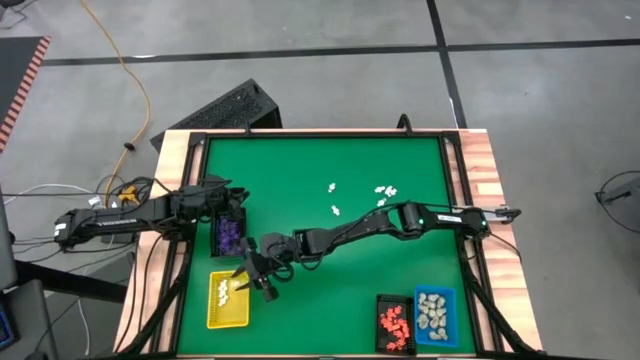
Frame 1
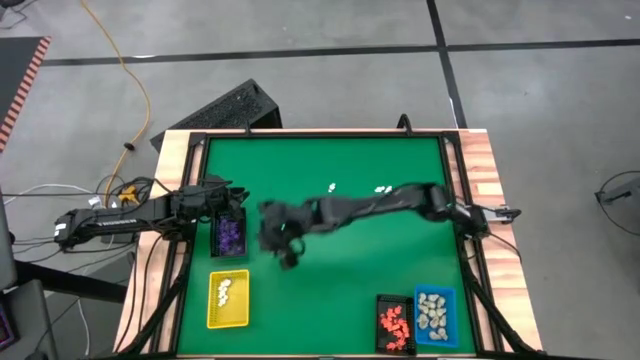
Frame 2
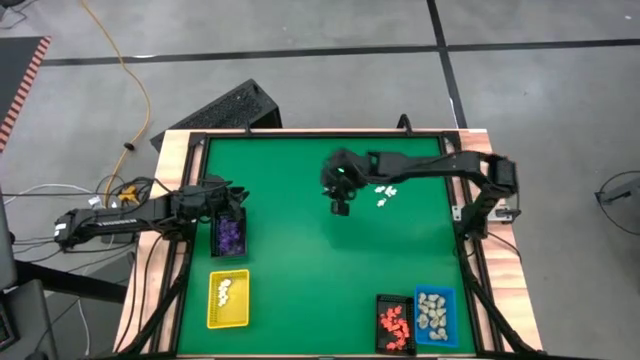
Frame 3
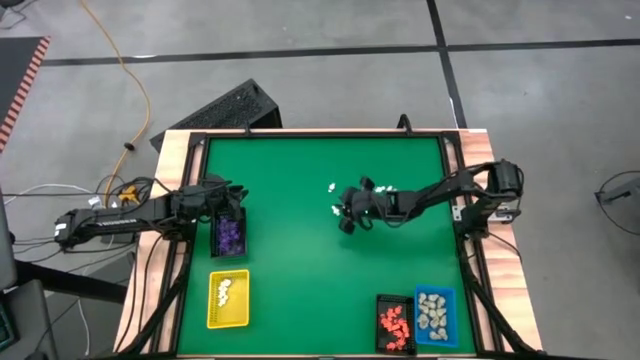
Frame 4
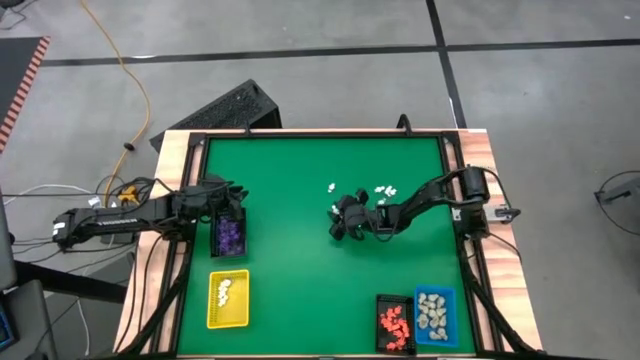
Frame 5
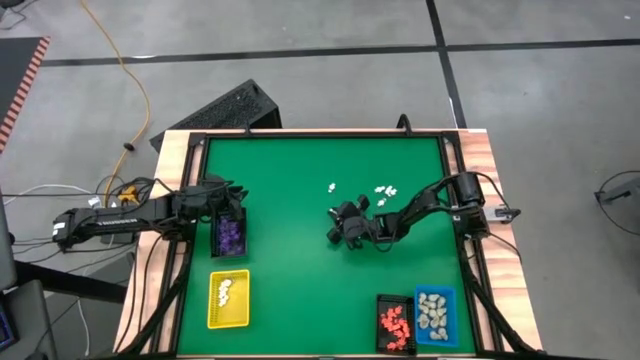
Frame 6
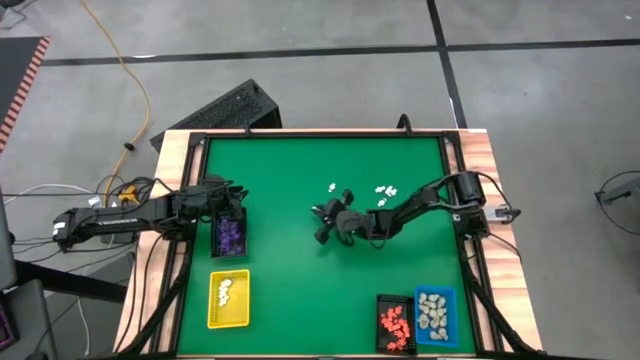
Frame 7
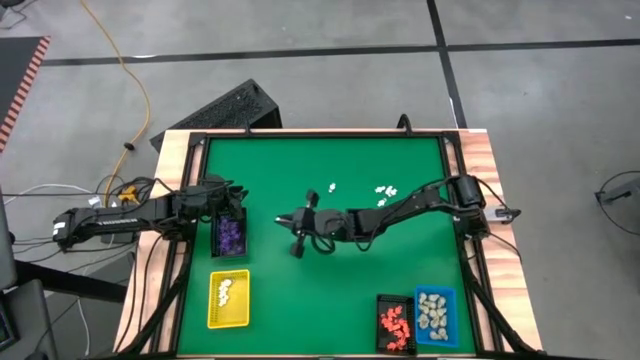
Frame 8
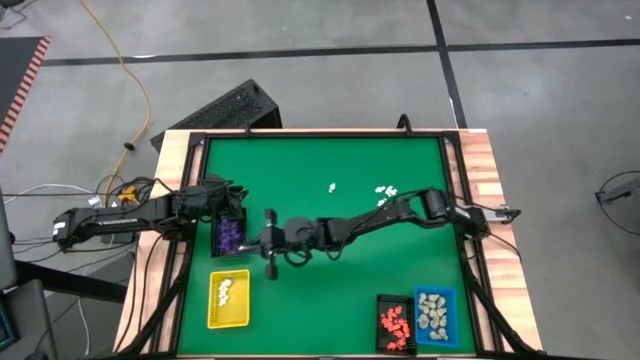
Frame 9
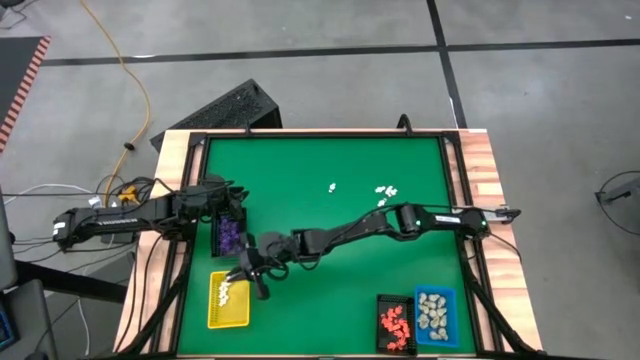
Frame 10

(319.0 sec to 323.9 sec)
Task: Sort Halloween decoration
Put the white skeleton toy into the yellow basket

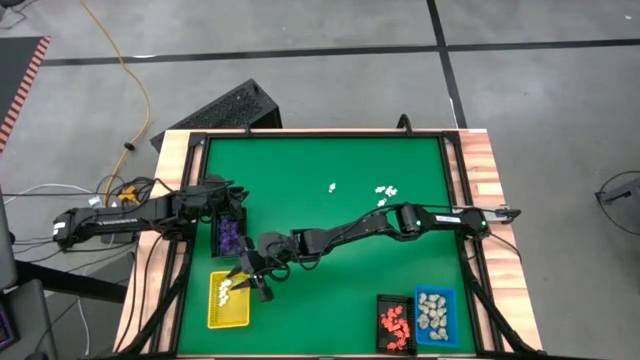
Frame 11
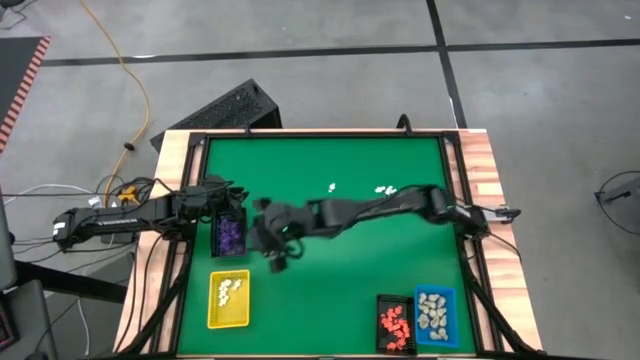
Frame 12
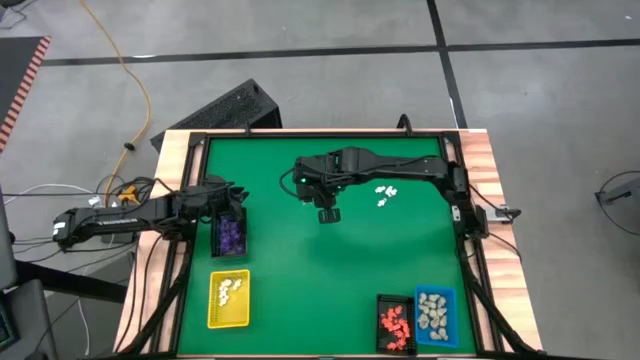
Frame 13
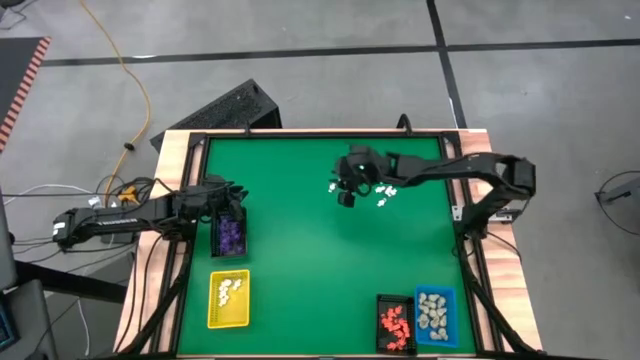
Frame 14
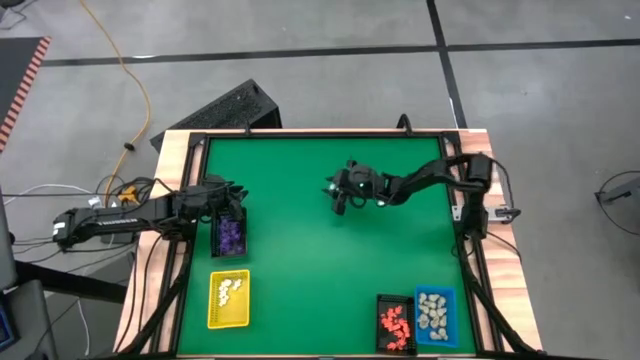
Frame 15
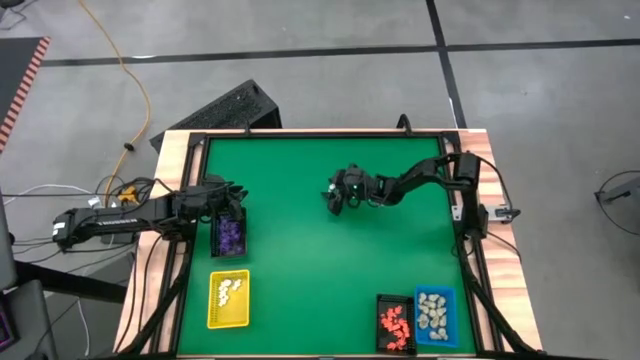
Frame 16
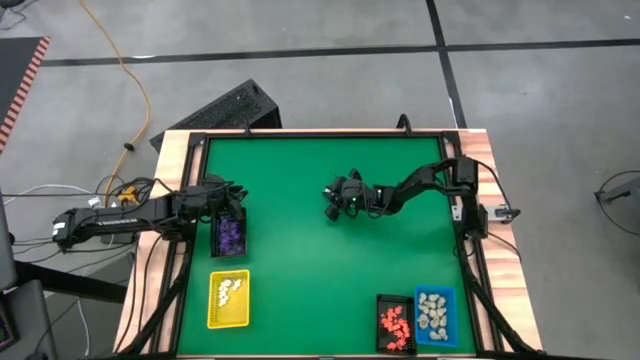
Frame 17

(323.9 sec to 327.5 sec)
Put the white skeleton toy into the yellow basket

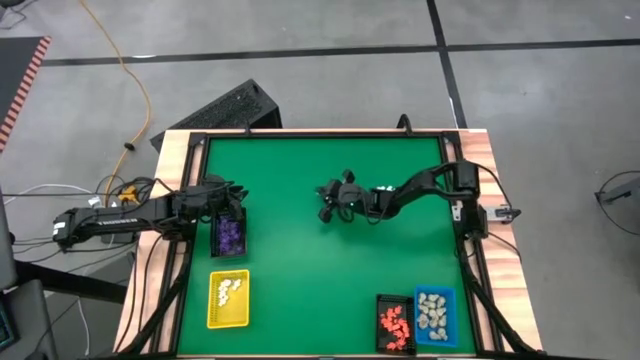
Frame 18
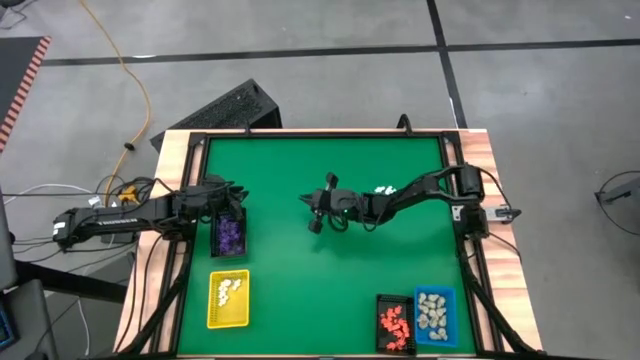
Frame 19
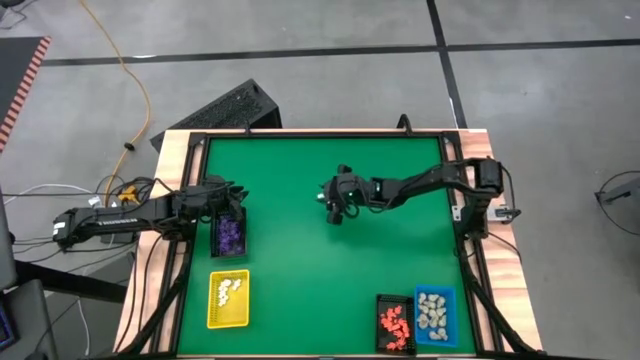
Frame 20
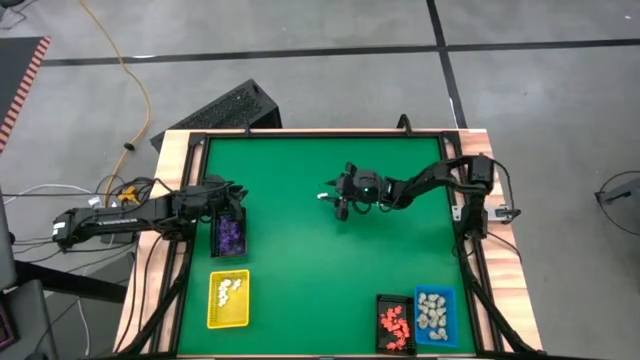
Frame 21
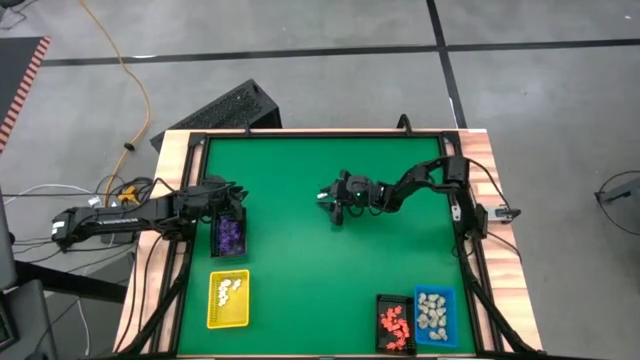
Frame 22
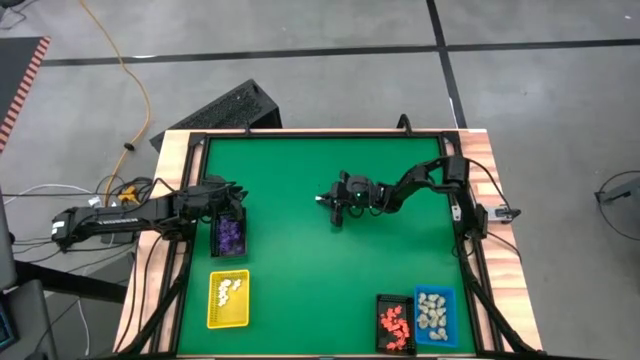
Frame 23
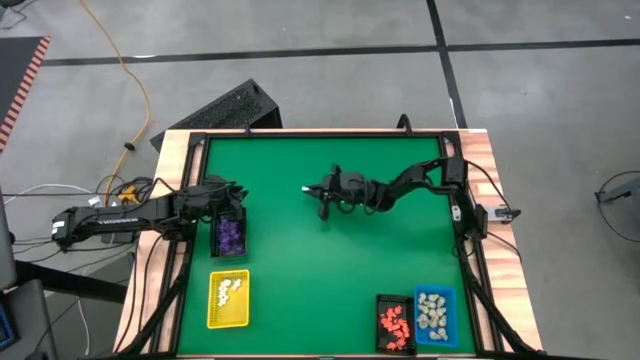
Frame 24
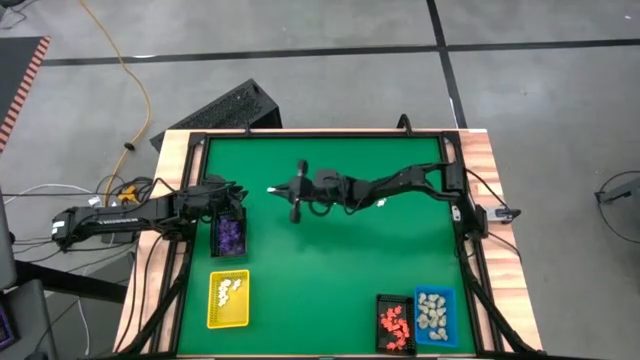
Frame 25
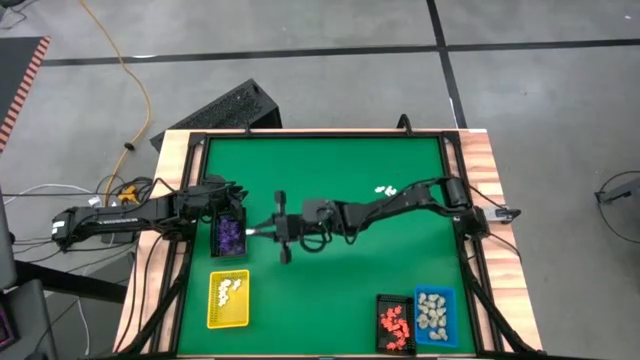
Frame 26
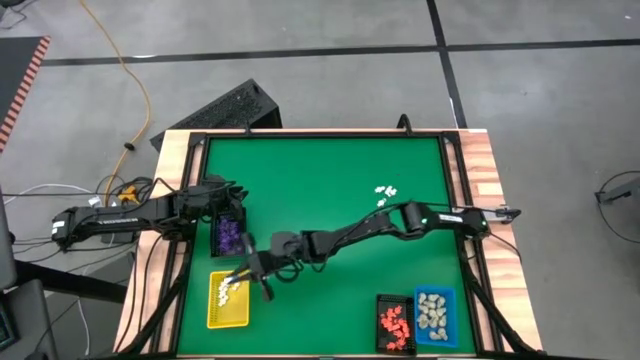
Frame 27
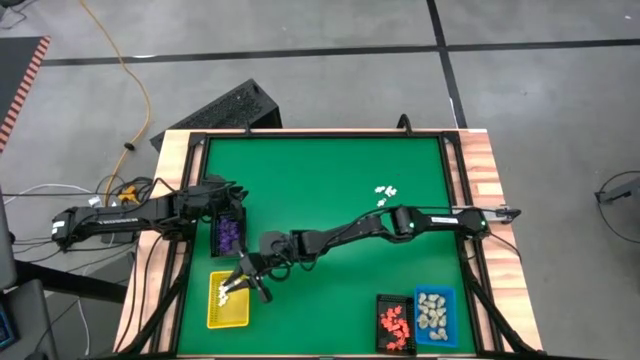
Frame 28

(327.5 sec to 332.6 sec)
Put the white skeleton toy into the yellow basket

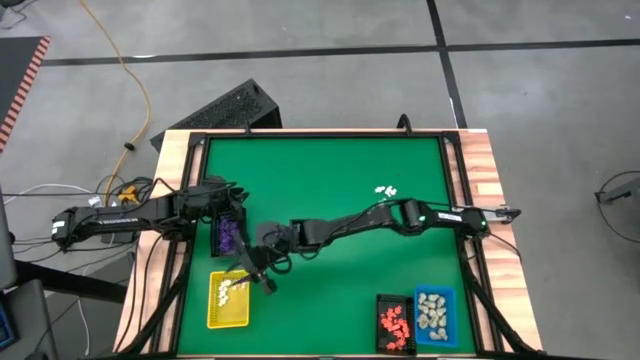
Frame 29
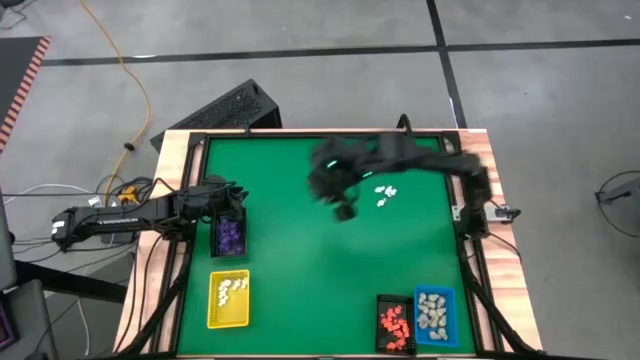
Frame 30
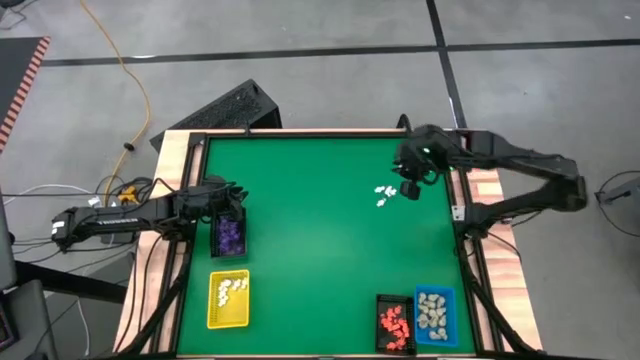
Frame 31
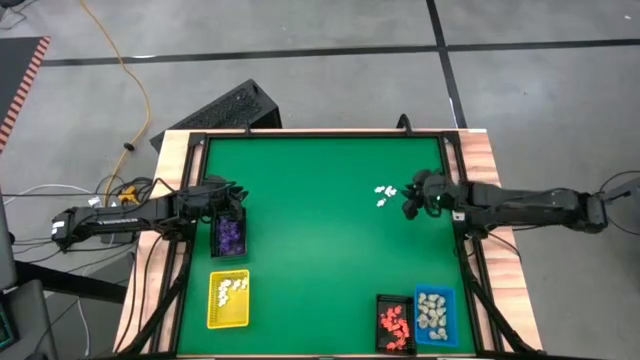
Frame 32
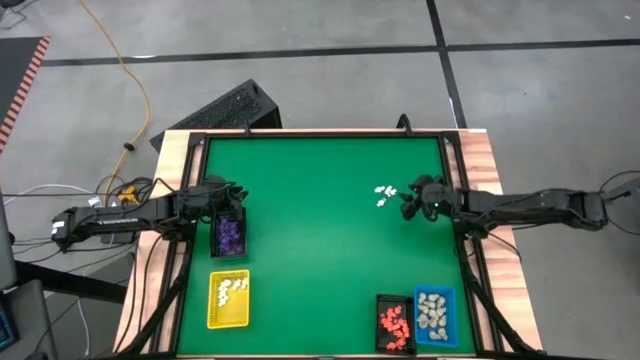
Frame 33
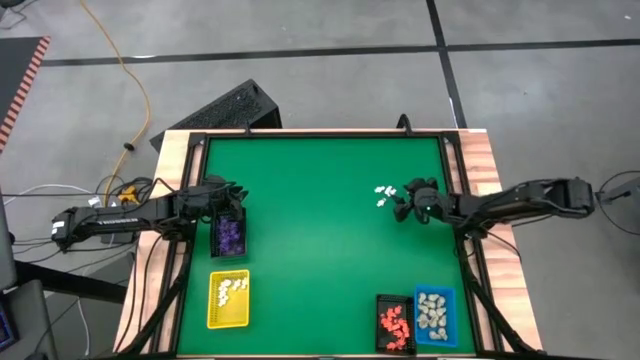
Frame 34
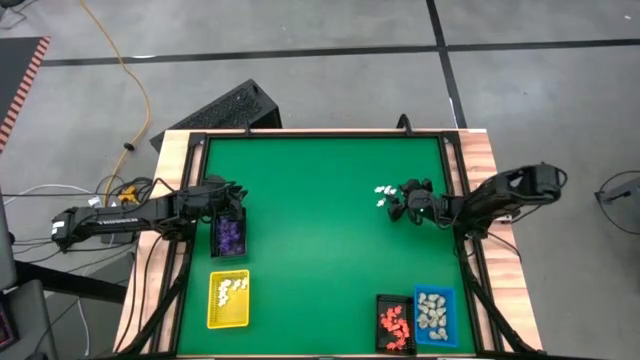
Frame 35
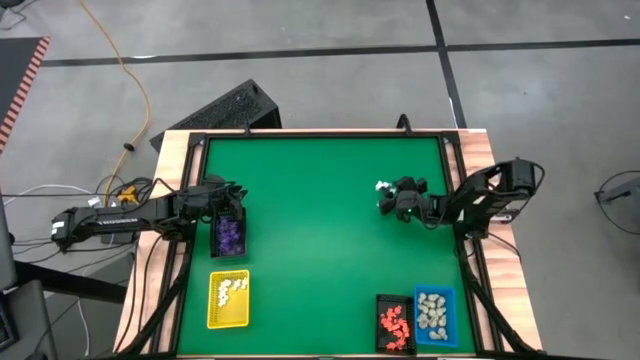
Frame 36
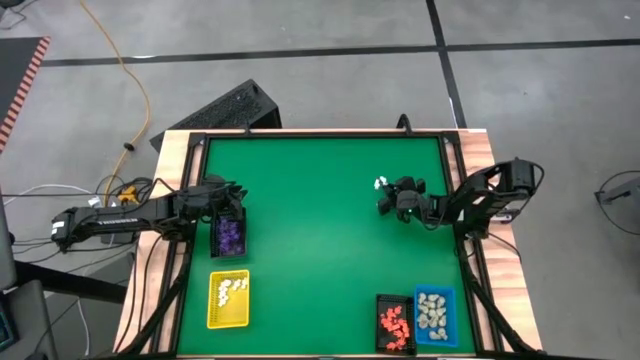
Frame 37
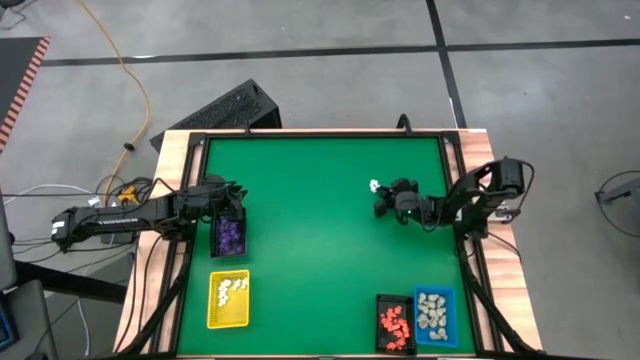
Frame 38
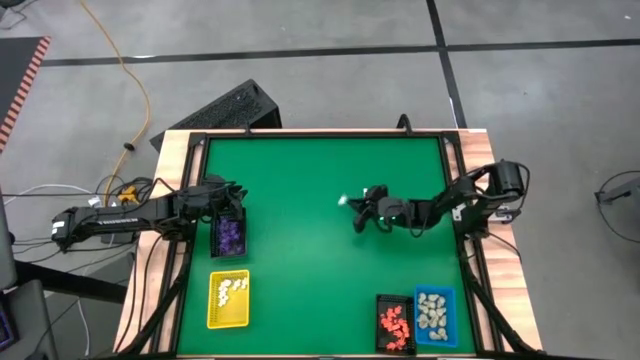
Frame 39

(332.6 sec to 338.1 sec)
Put the white skeleton toy into the yellow basket

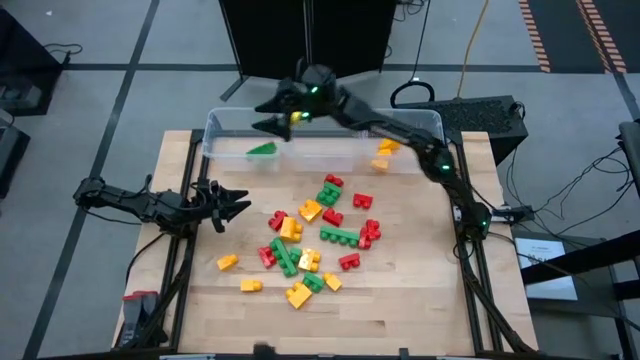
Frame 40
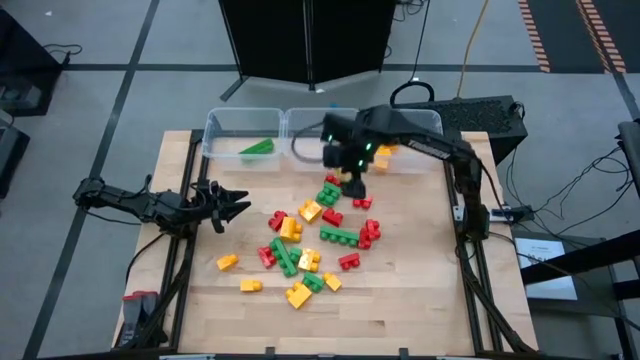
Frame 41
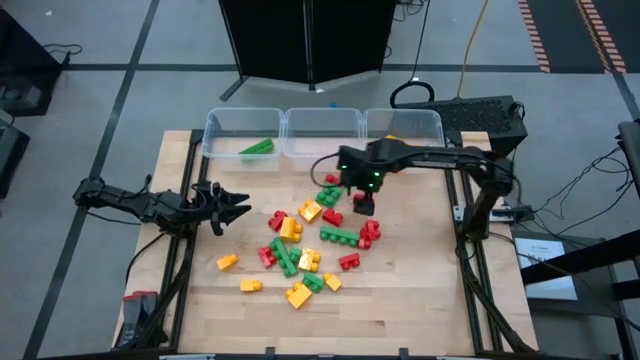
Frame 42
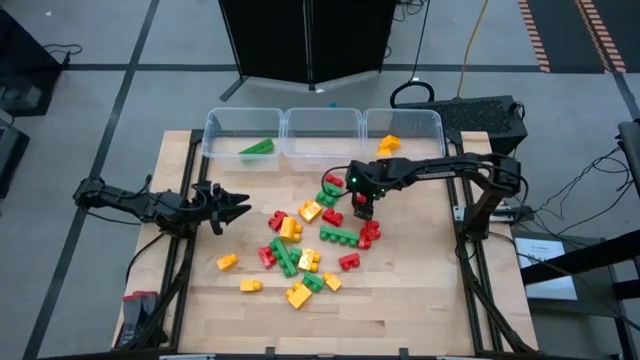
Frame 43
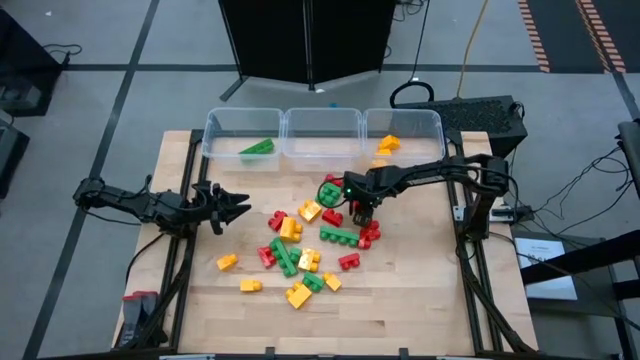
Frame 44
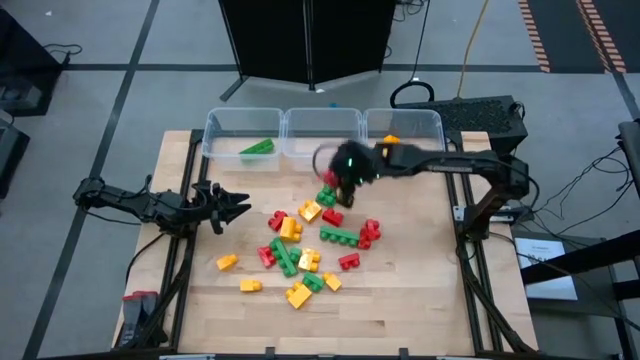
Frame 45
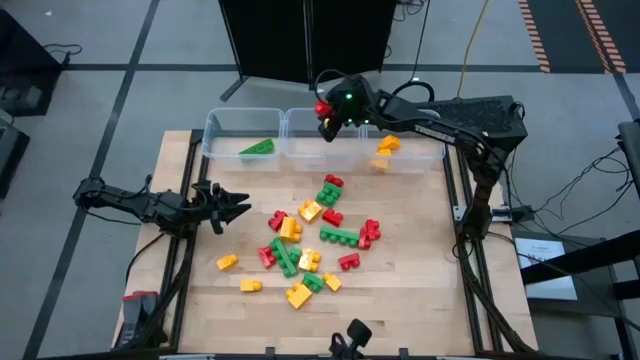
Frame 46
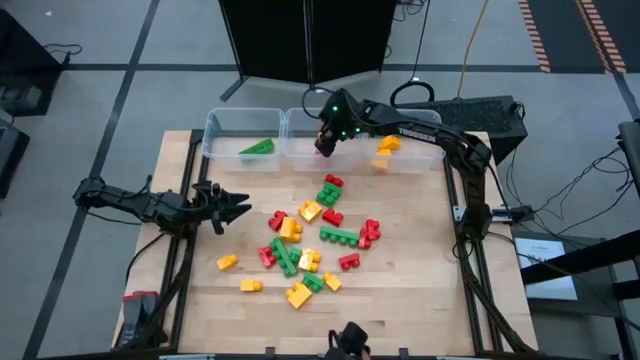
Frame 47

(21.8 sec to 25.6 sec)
Task: Sort blocks
Put the red game piece with 2 studs into the center transparent bin
